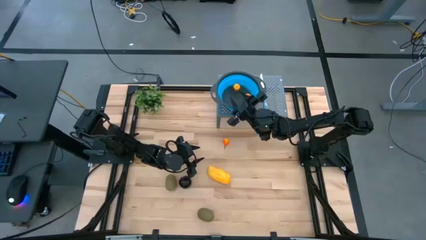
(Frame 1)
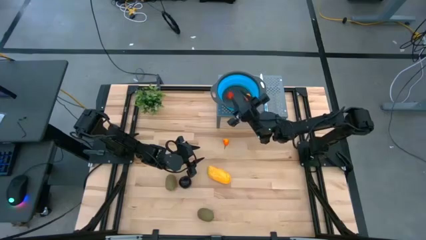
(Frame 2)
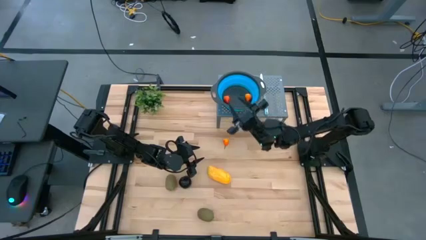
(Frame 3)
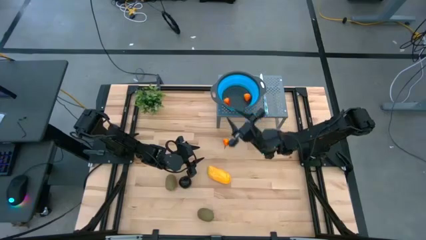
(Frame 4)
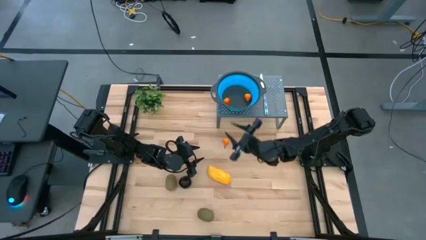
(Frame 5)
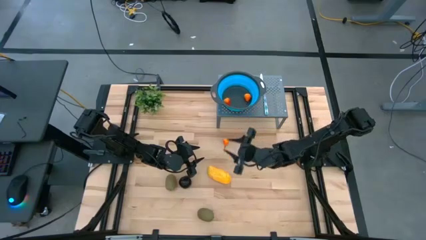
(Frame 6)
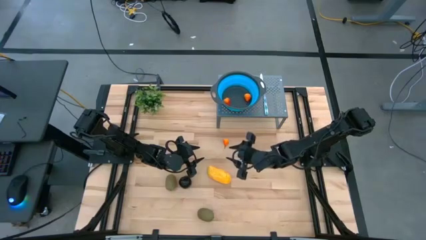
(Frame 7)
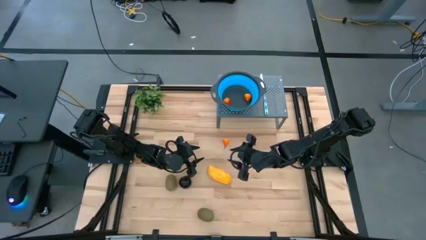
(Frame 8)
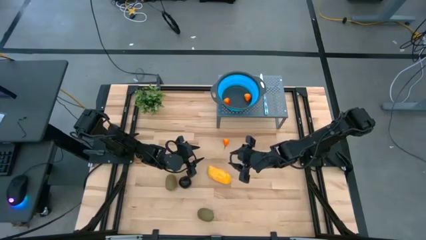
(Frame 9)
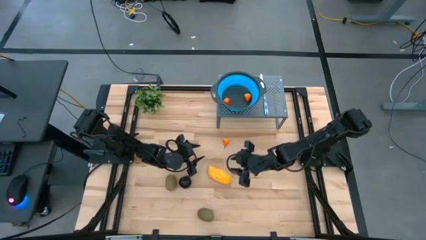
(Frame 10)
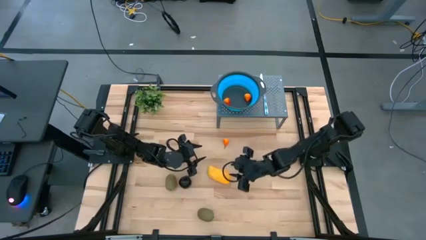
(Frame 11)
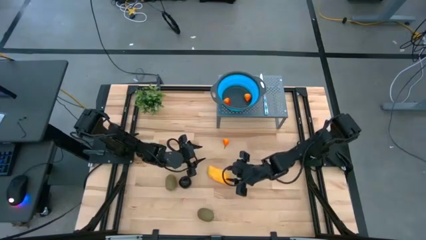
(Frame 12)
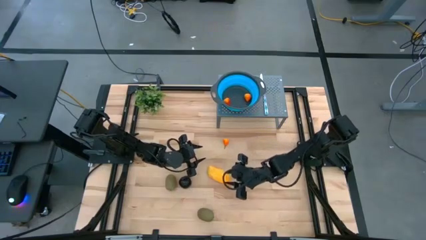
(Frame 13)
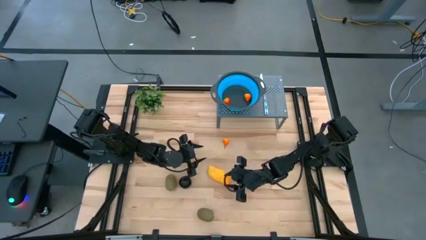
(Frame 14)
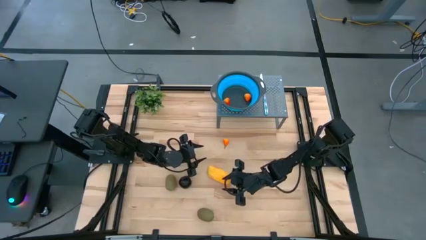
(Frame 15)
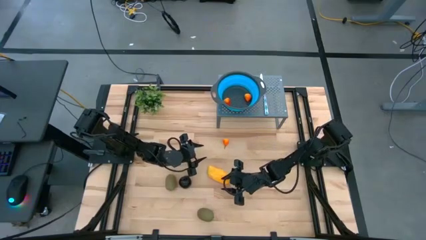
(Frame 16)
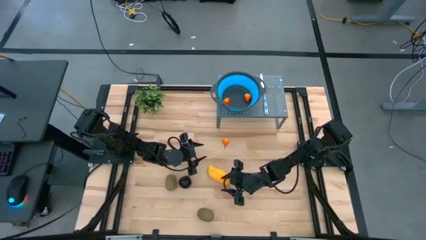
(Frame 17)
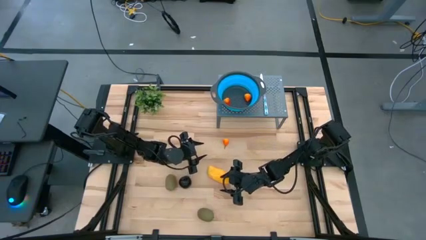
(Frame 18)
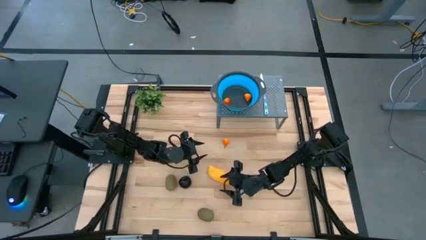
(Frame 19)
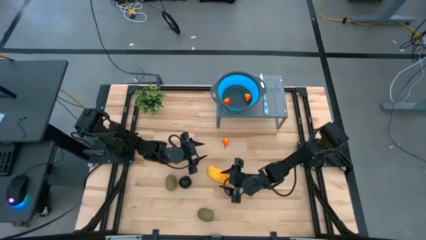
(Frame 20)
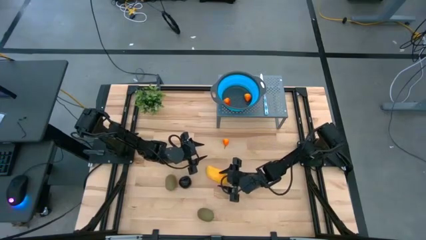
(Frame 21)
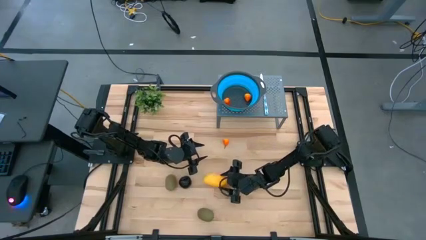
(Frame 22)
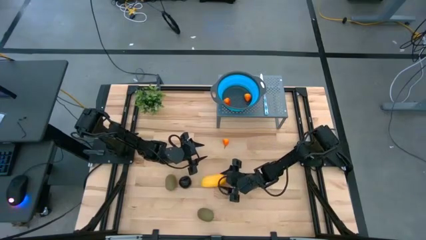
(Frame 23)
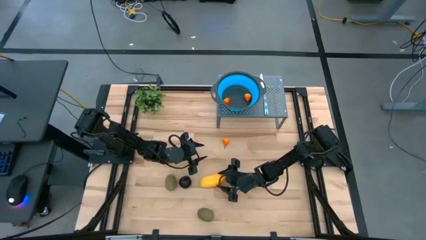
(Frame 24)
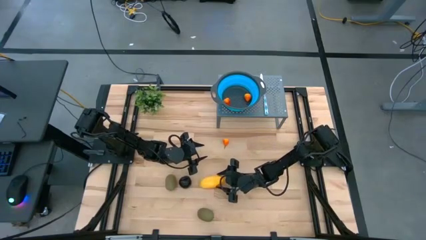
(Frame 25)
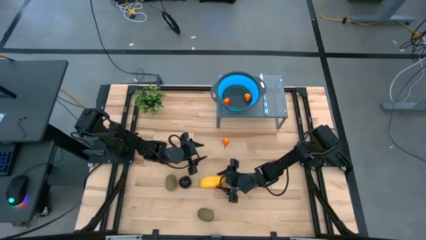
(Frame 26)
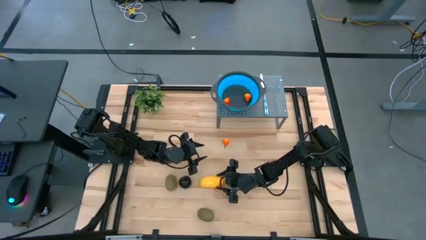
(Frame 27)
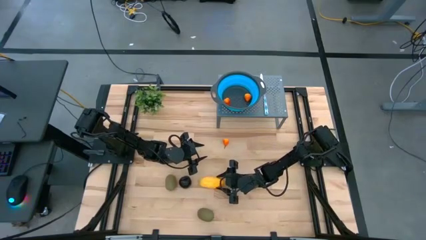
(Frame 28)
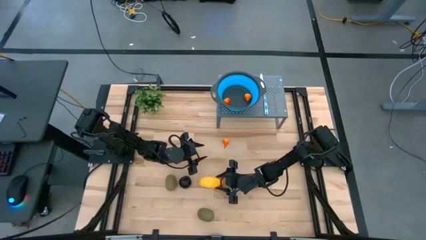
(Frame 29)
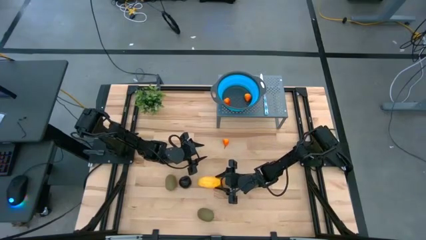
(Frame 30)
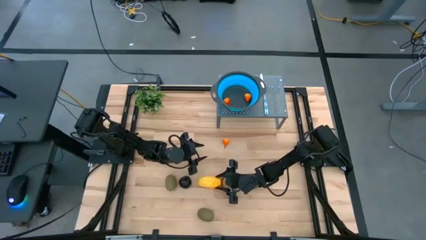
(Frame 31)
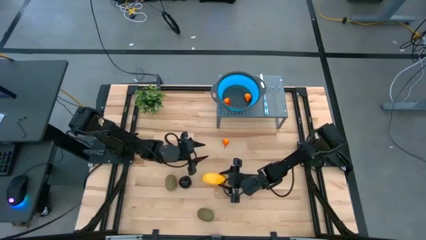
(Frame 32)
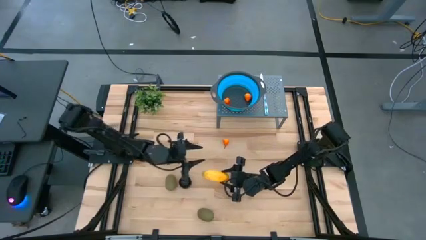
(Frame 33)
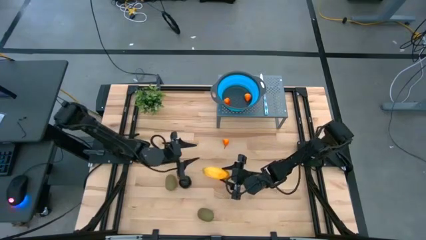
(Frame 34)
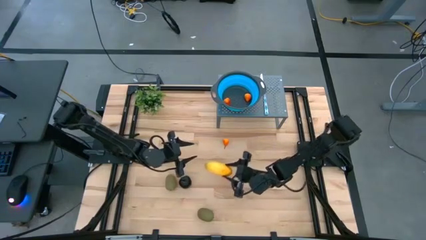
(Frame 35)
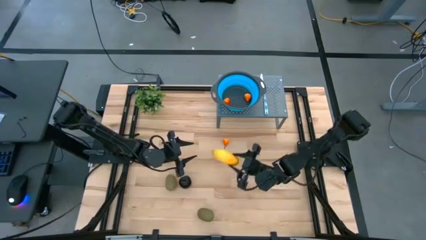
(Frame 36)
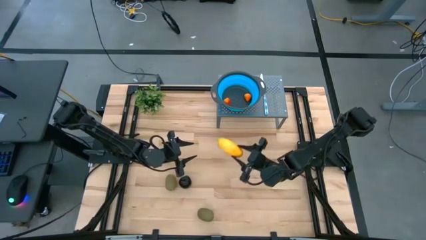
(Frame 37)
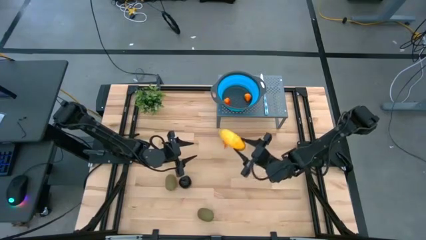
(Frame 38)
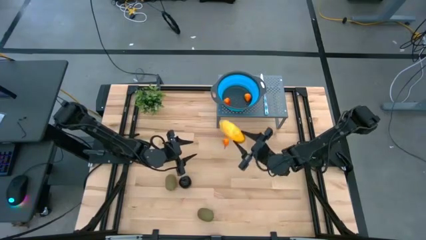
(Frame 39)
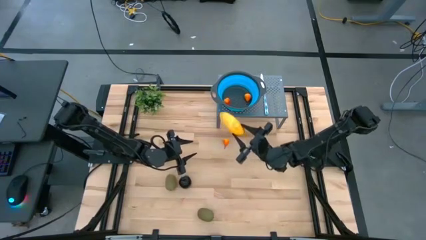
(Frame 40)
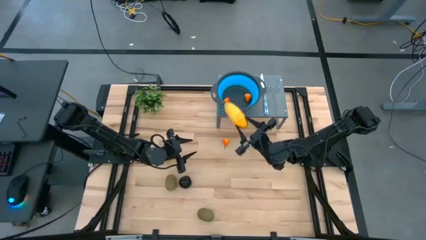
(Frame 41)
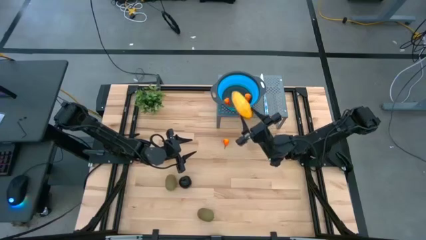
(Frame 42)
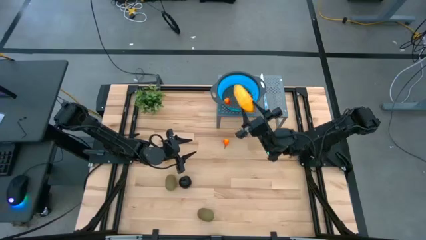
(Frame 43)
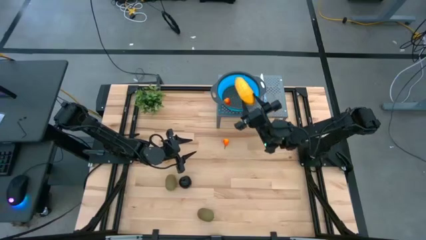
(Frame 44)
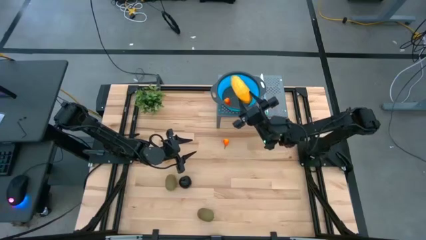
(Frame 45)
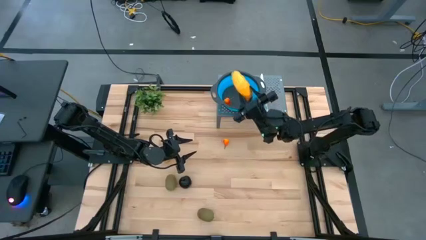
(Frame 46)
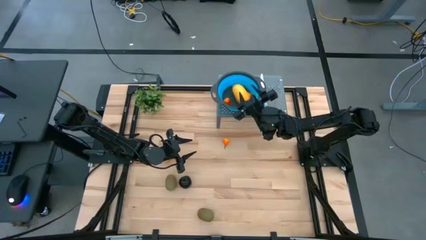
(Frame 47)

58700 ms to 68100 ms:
Task: Pick & Place Fruit
Put the yellow mango into the blue strainer bowl

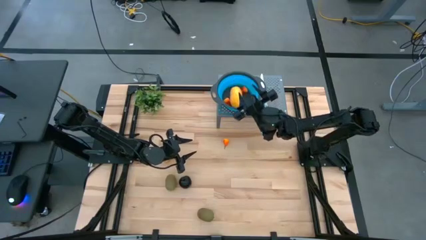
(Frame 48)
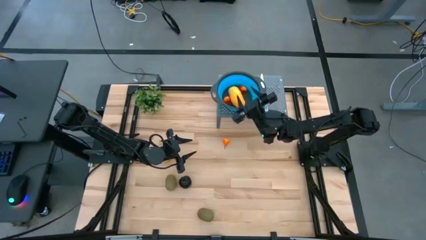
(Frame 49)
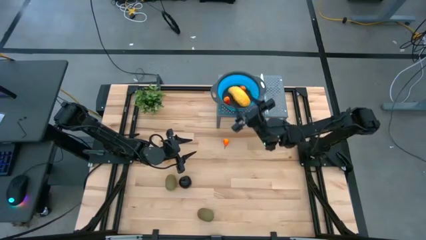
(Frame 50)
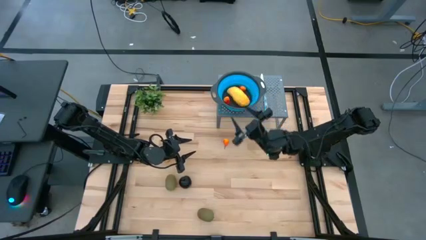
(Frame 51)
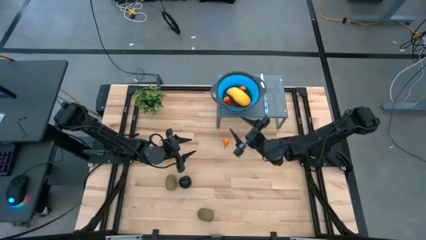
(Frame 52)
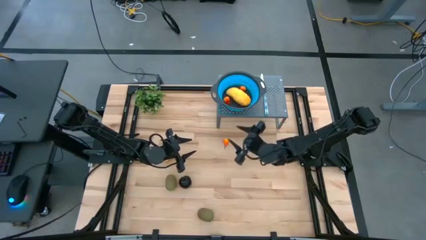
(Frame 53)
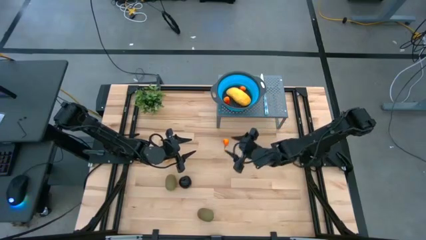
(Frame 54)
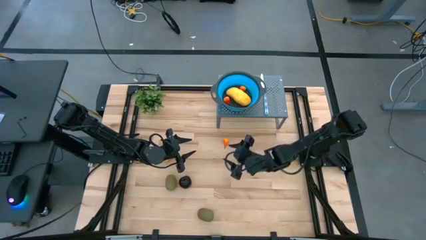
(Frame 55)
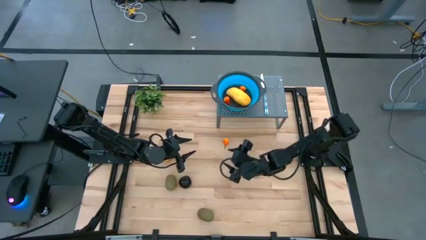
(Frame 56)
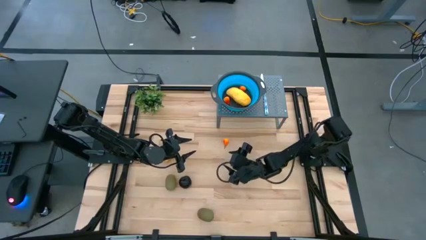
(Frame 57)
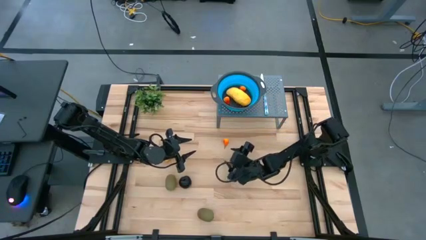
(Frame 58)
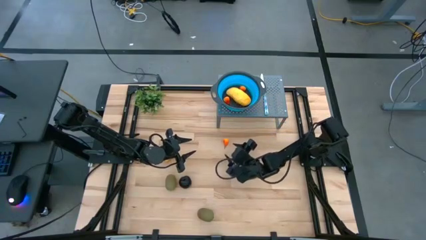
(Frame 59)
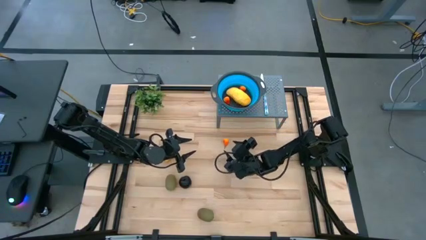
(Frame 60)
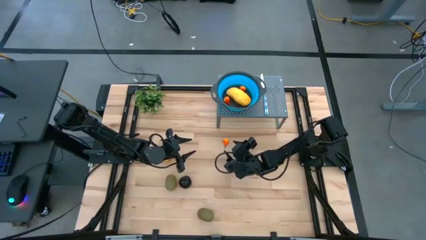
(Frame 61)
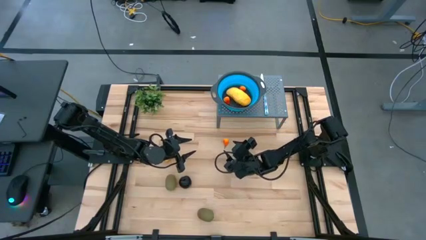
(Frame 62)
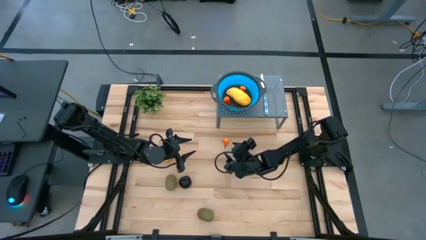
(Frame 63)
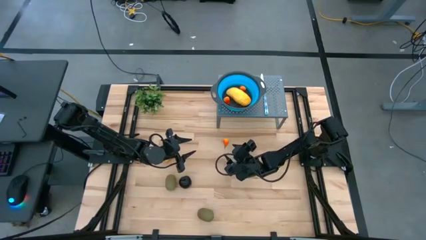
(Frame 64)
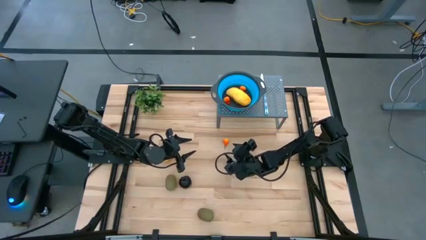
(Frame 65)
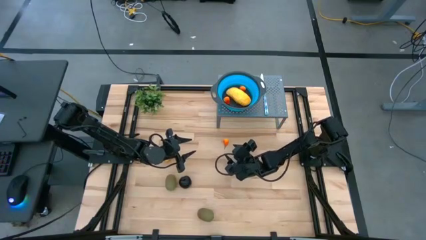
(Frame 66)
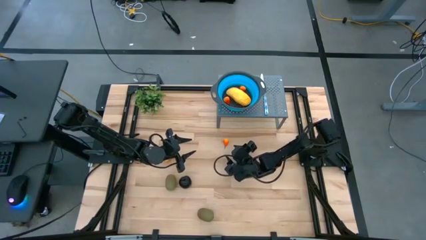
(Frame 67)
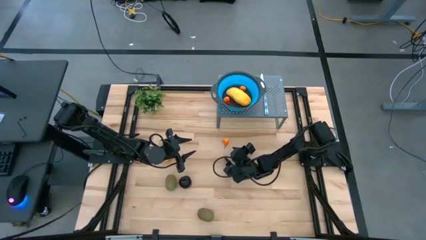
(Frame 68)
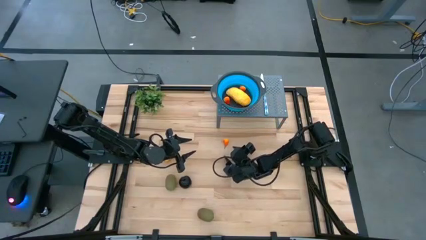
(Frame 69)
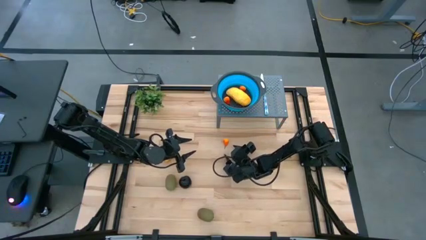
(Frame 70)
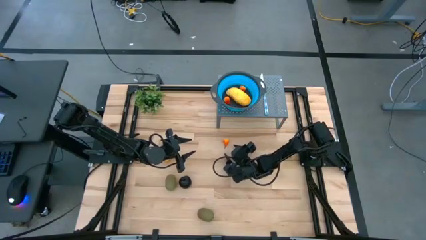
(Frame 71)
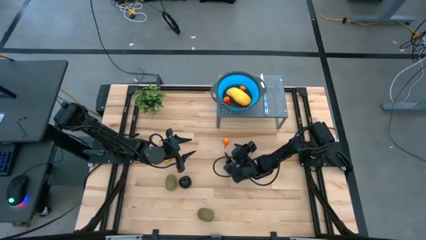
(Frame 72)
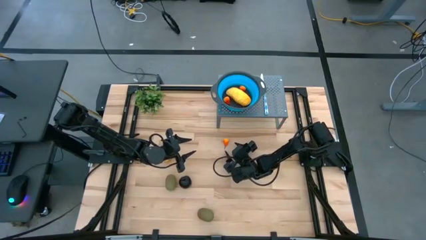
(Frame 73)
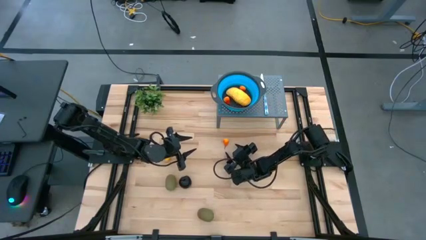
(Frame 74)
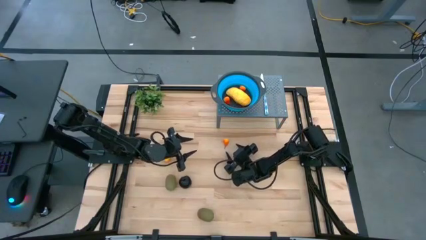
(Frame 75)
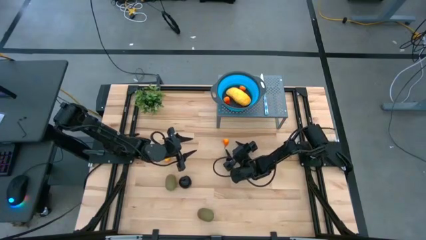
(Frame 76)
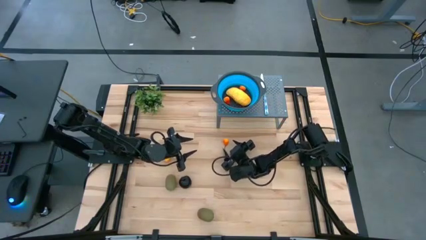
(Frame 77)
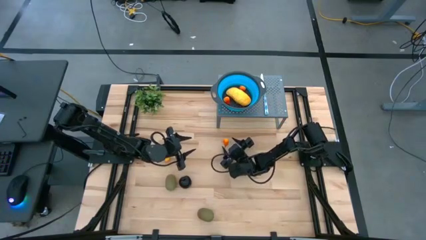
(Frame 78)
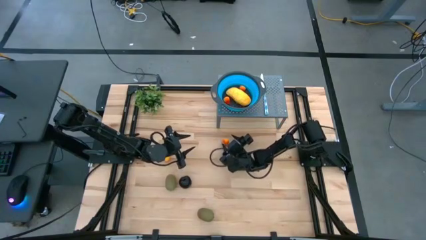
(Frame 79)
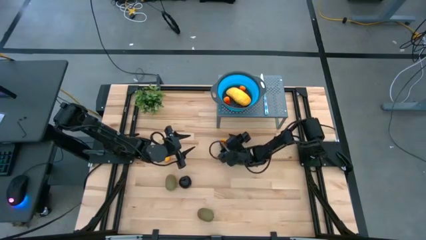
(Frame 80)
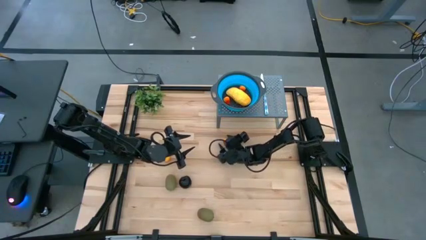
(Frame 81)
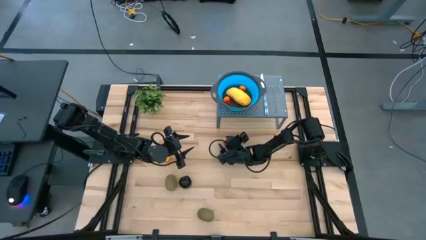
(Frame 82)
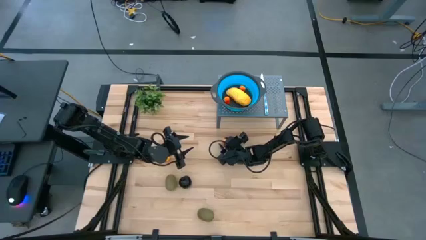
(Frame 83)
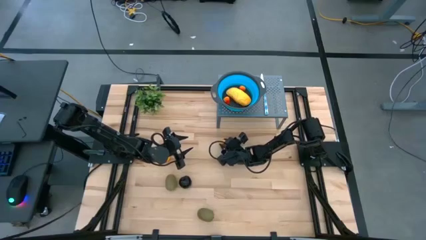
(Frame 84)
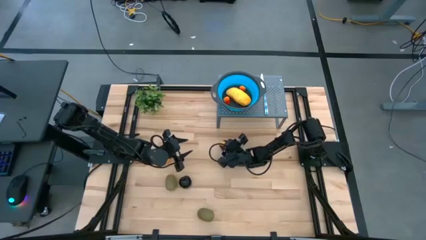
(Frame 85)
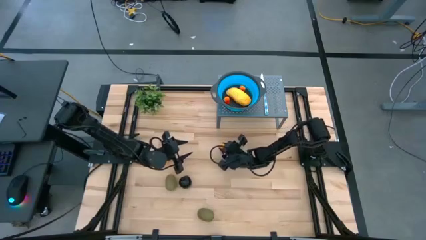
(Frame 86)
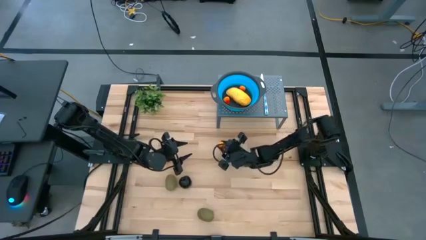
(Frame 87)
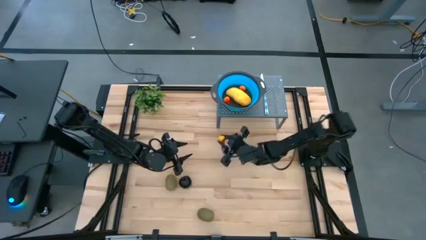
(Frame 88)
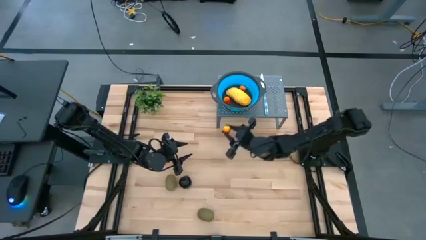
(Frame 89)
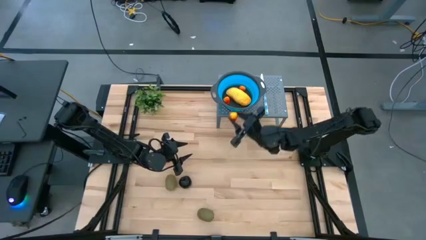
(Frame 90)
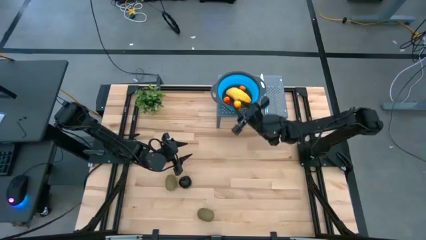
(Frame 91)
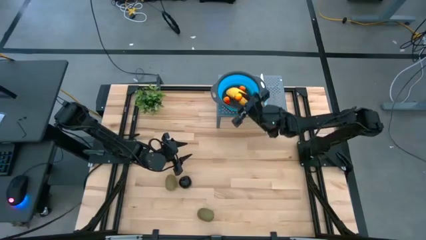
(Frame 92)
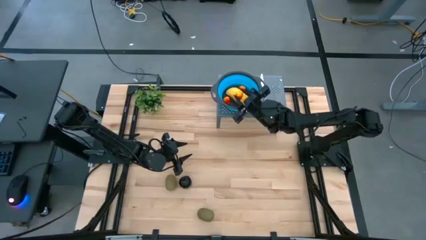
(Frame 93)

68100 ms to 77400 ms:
Put the yellow peach into the blue strainer bowl
